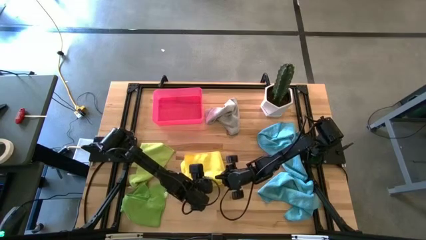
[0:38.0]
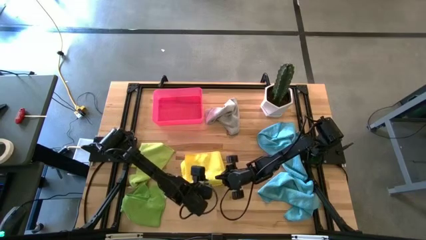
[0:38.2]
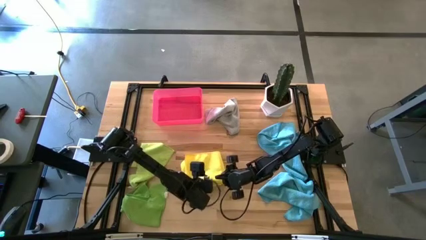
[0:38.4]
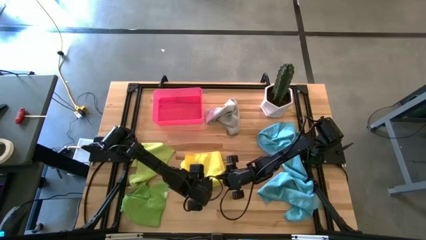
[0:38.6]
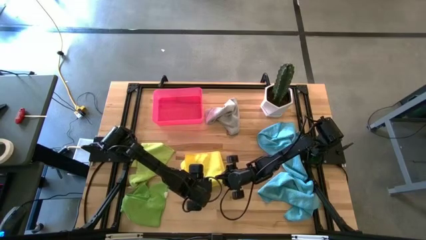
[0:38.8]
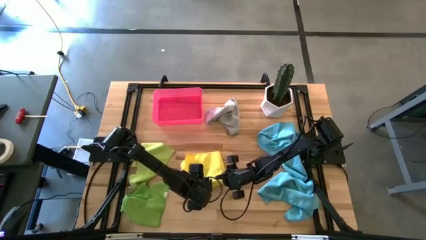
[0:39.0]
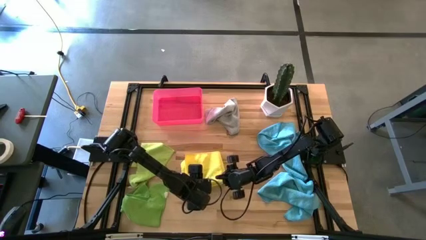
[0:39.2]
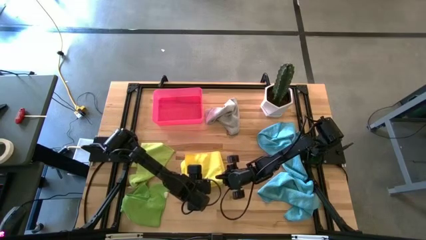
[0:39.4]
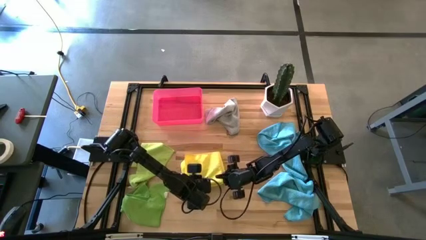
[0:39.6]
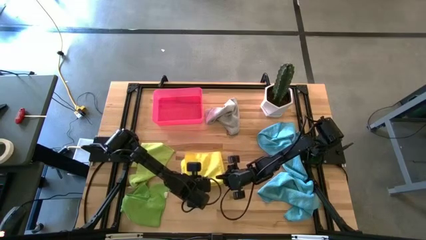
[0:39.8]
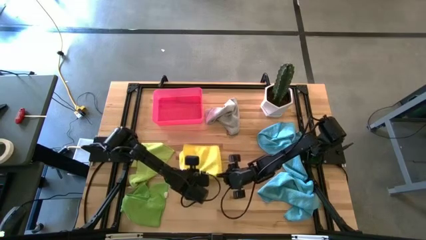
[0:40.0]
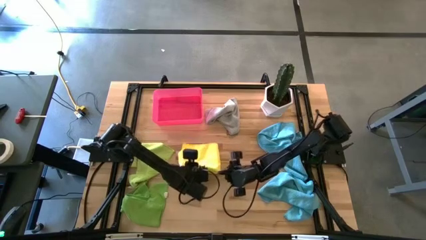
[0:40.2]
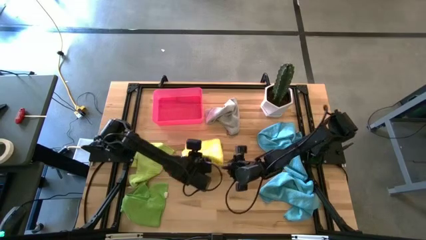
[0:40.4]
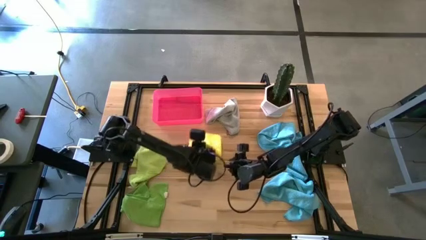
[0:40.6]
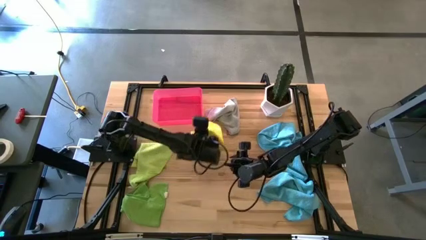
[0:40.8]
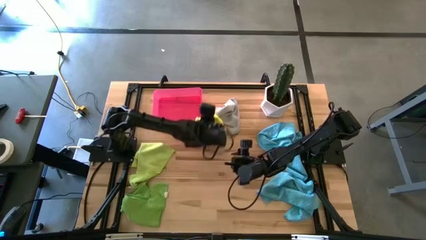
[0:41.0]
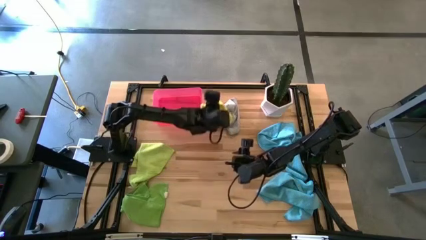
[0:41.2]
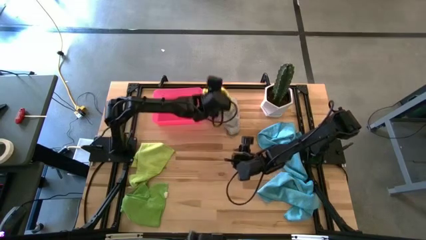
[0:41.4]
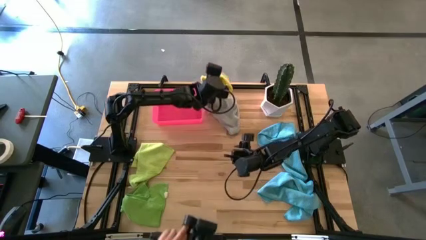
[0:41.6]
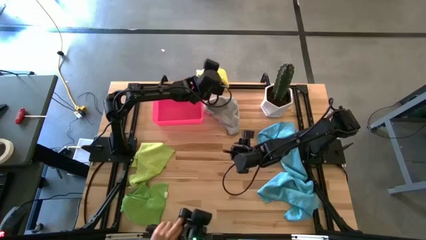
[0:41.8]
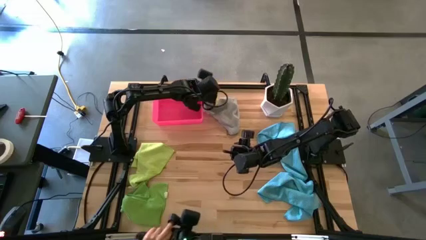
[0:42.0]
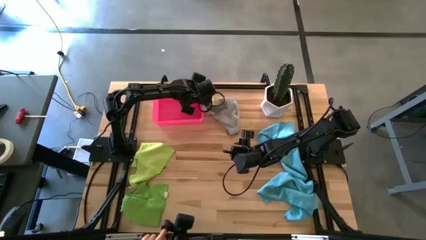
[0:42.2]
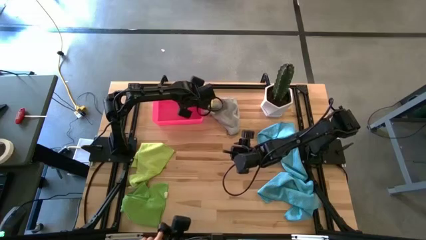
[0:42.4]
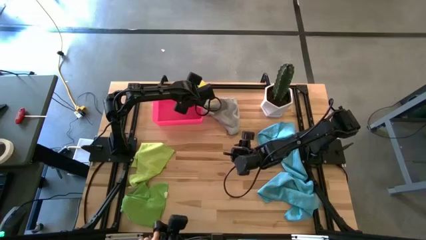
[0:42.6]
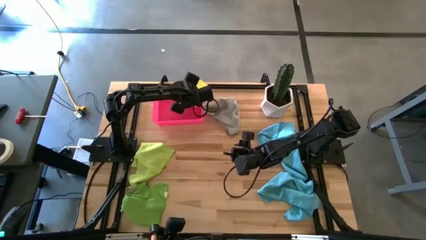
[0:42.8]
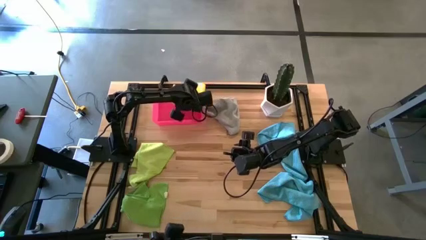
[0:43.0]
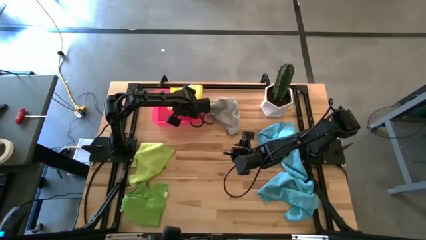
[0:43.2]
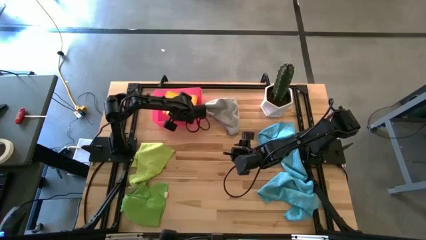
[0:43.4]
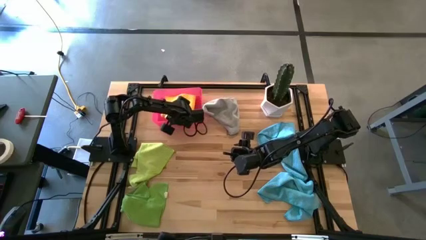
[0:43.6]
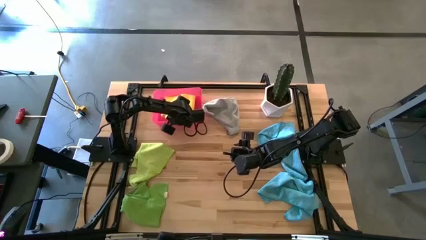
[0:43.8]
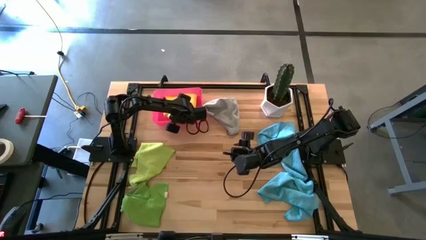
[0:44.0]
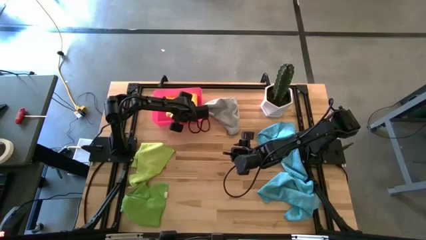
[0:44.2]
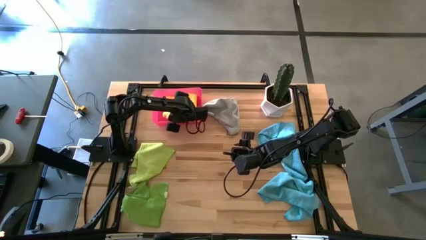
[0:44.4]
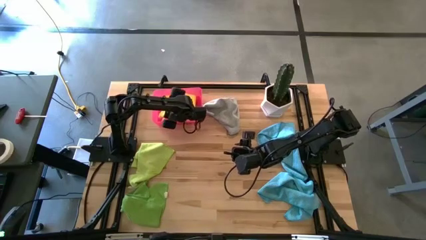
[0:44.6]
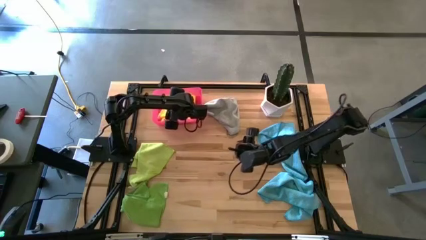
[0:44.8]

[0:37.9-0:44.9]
Task: Fold microfiber towels
Put the yellow towel into the bin

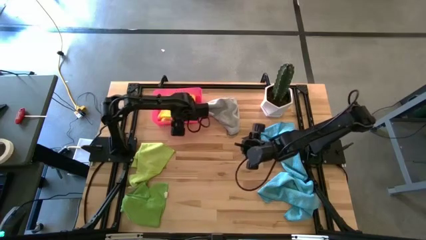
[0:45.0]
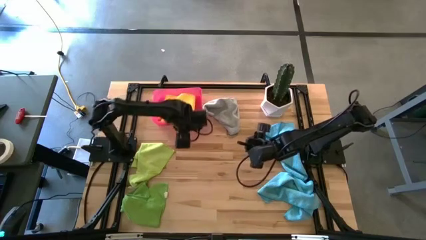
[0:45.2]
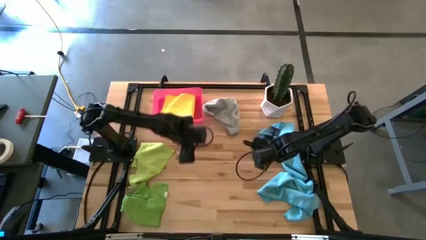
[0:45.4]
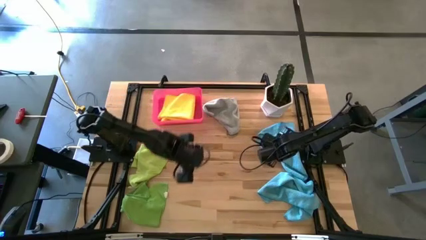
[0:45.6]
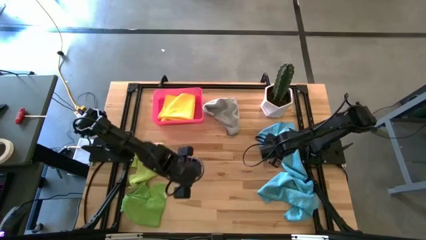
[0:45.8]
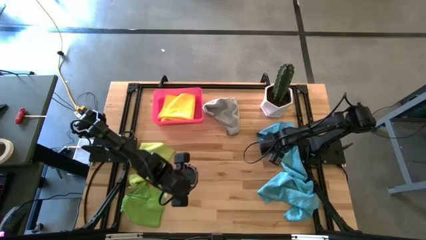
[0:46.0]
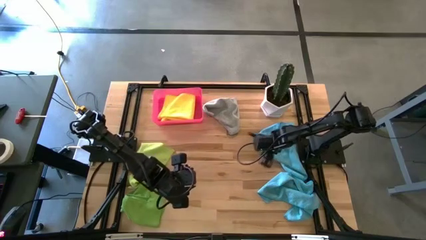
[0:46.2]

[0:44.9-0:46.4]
Fold the top blue towel on the table

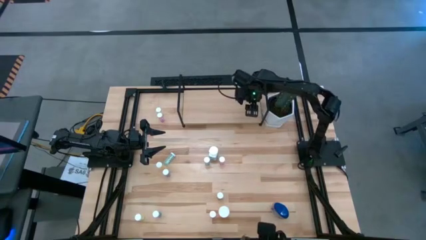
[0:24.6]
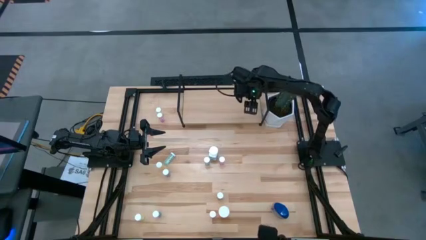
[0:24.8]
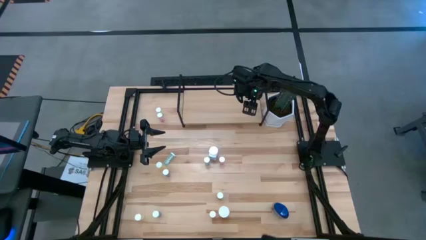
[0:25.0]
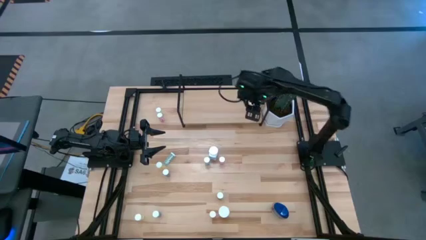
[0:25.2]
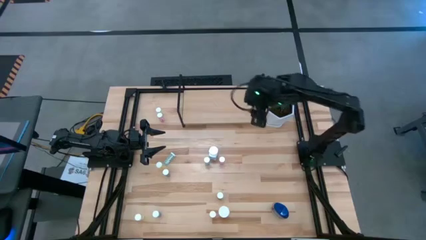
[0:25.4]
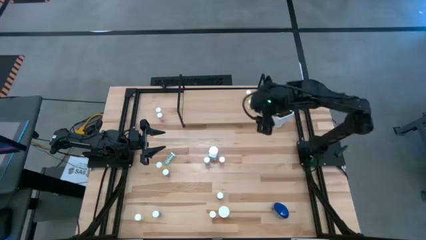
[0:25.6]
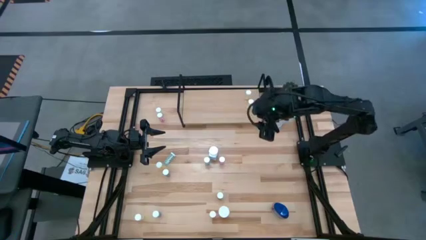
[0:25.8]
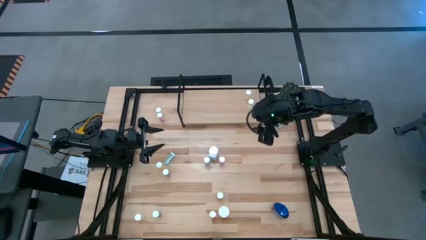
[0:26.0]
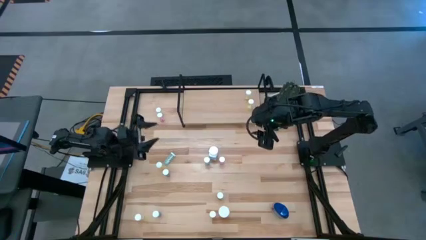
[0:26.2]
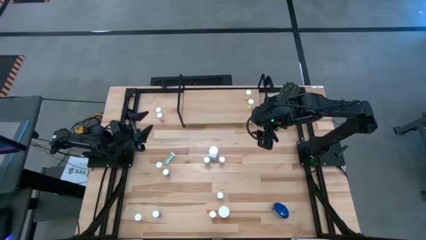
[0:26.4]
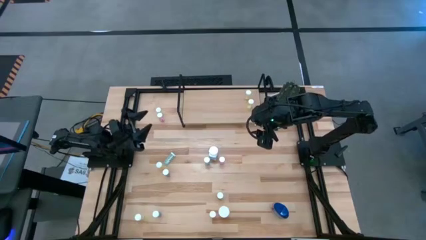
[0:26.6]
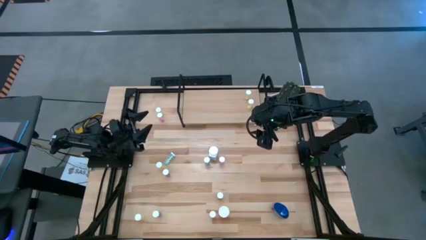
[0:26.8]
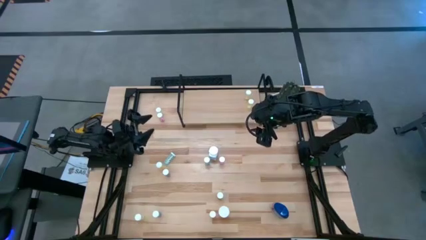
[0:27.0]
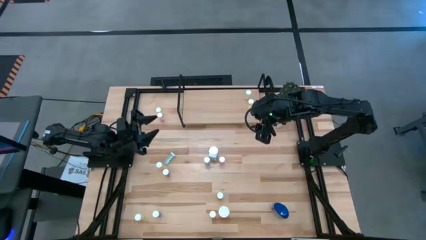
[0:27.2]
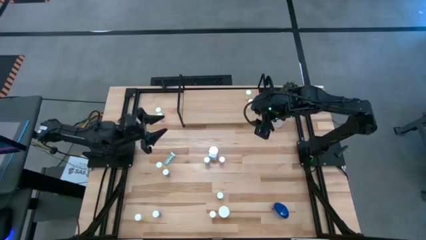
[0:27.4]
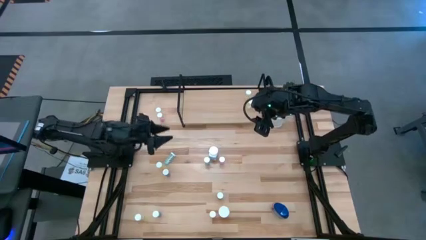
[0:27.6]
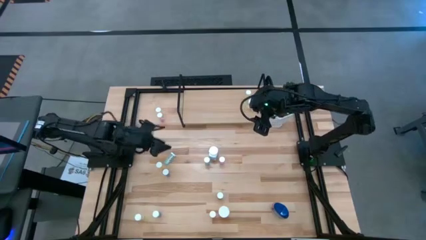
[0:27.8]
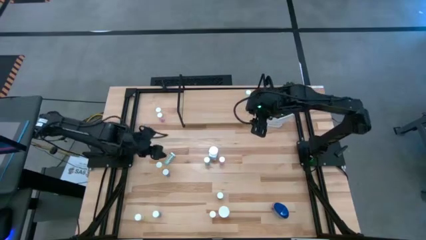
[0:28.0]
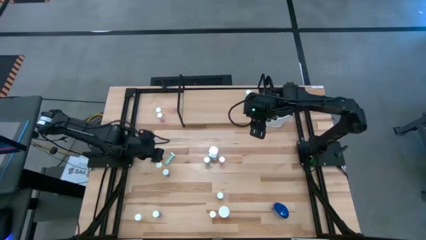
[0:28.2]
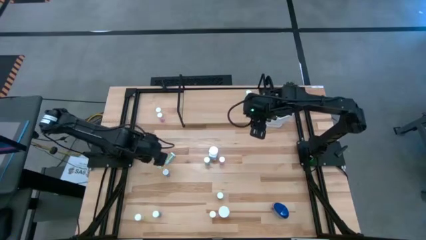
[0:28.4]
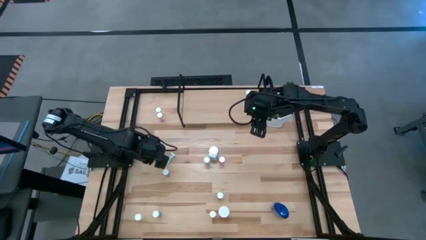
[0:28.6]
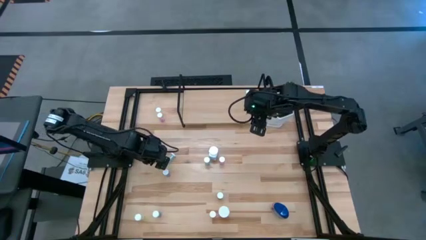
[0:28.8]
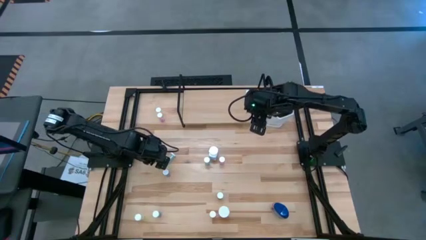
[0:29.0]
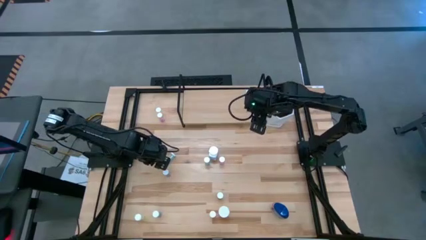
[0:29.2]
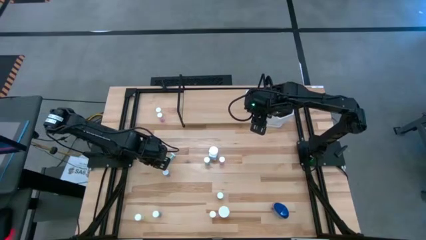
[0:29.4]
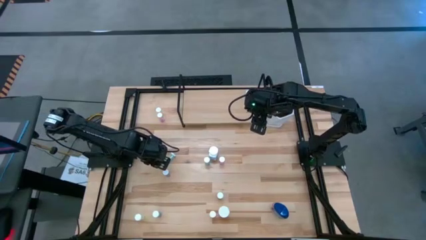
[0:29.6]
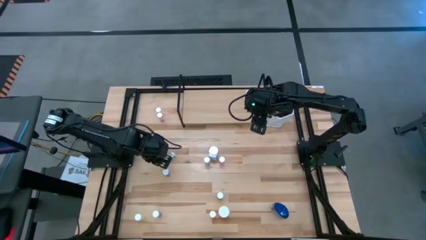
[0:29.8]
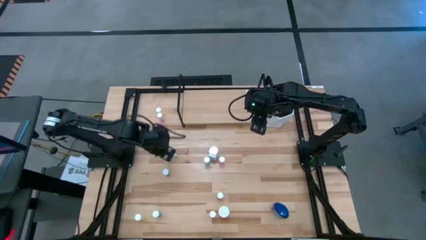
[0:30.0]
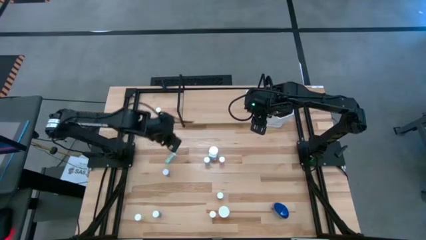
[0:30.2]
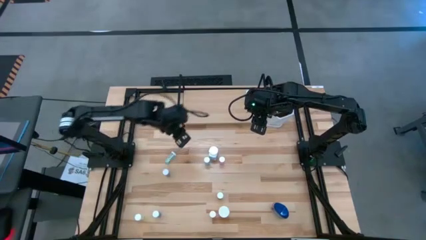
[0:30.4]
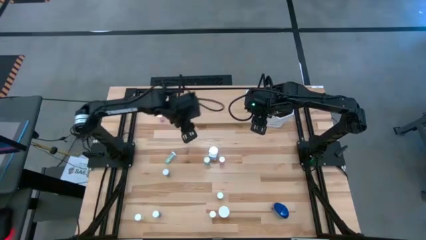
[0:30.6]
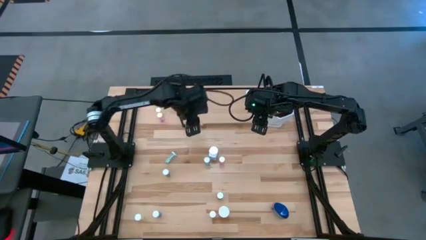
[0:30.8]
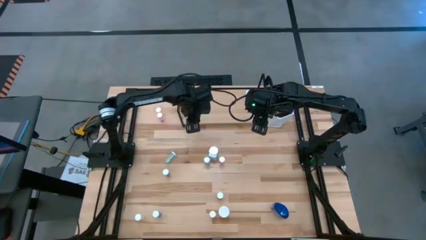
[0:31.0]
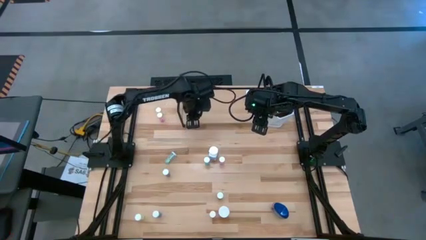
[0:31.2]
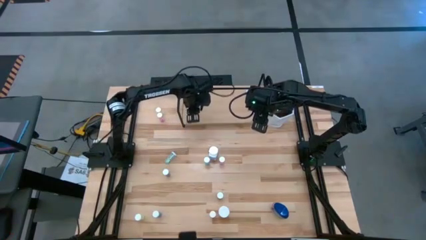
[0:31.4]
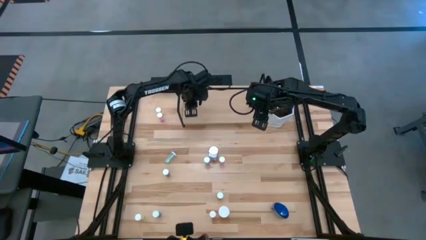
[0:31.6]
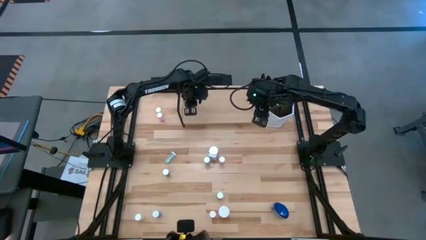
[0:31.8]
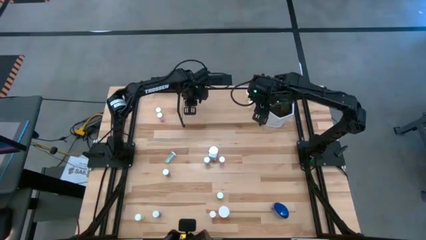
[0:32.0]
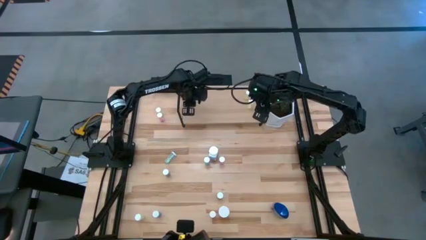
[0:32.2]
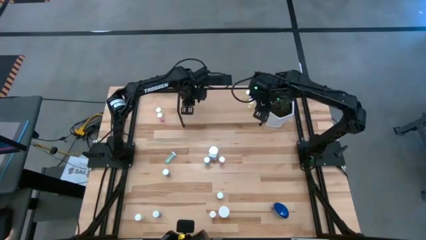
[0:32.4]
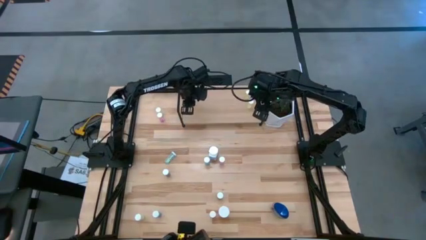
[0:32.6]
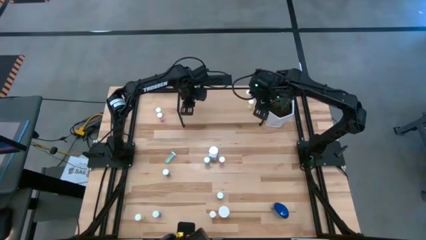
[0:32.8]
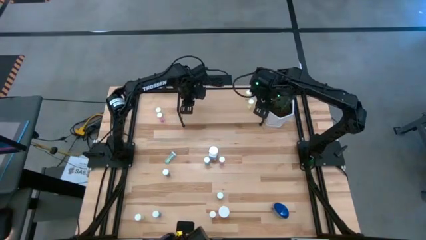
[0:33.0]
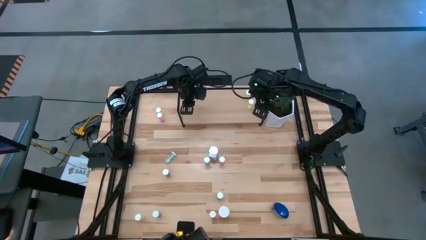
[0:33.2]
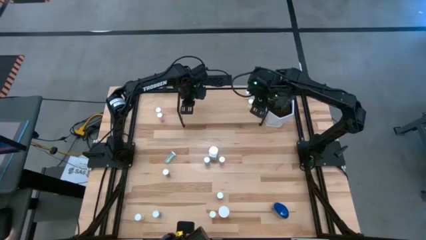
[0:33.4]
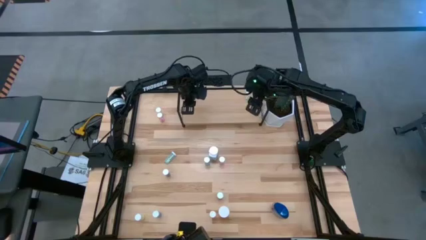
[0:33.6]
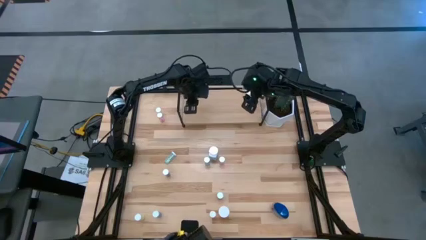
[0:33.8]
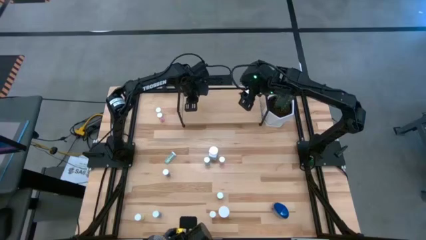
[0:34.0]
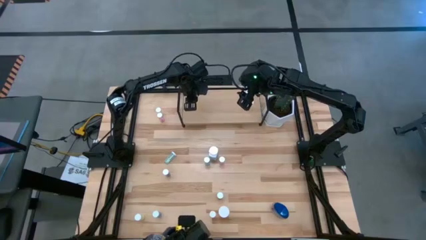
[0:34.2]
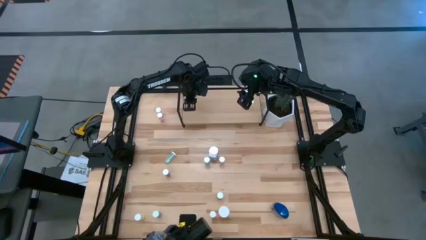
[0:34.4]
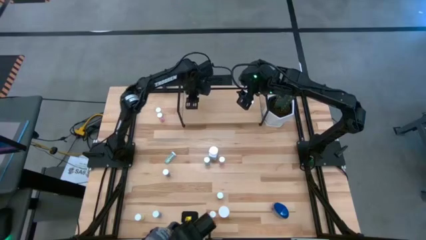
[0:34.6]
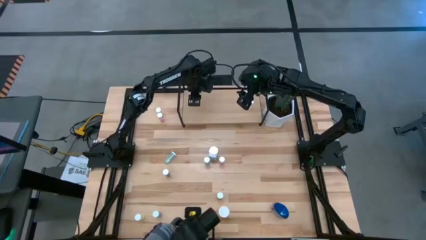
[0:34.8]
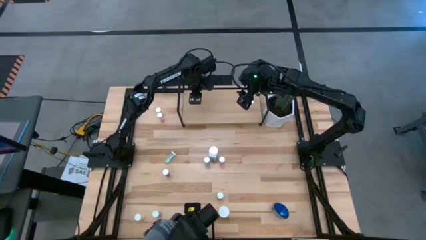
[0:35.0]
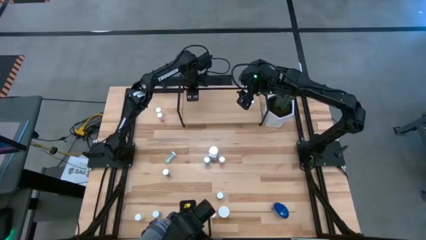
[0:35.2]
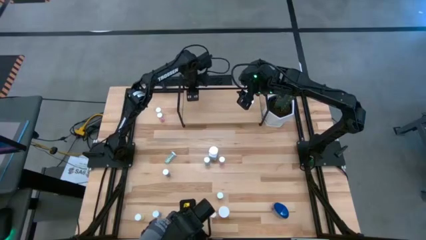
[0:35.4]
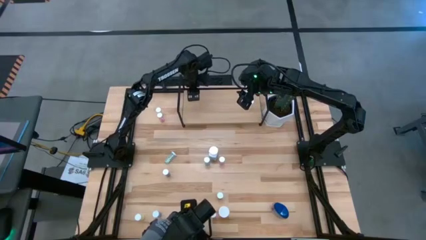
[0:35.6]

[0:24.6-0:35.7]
Task: Pick and place medicine bottles onto shelf by color
Put the yellow pill bottle on the shelf
